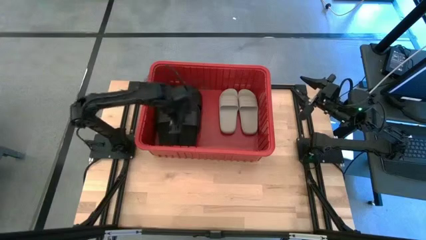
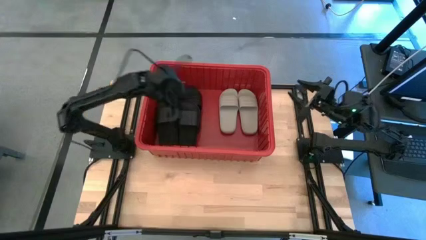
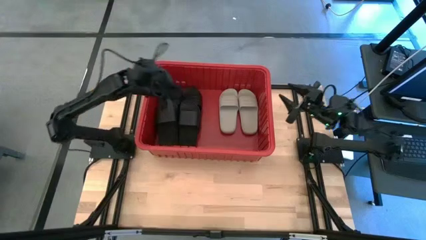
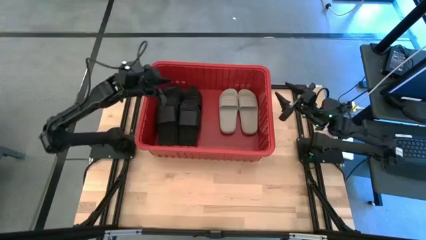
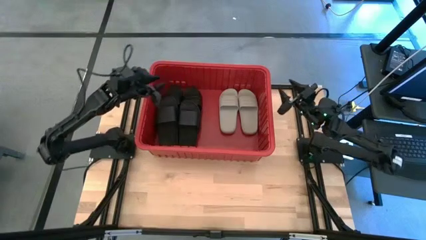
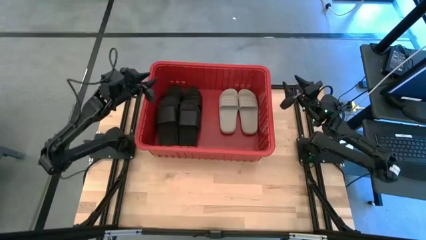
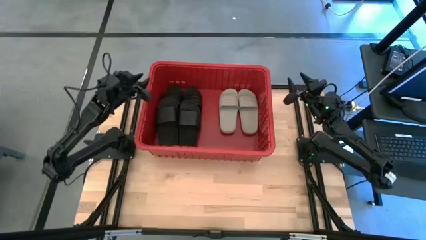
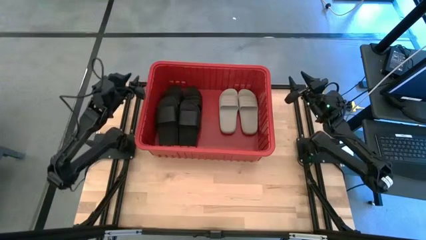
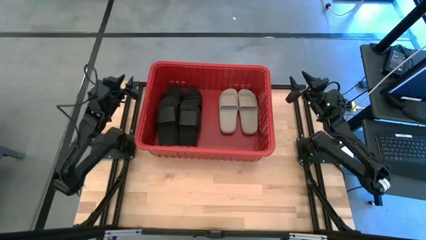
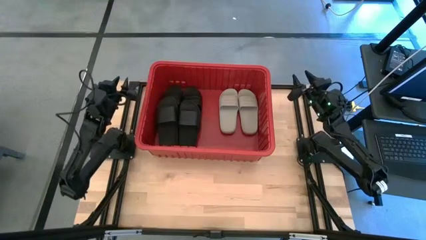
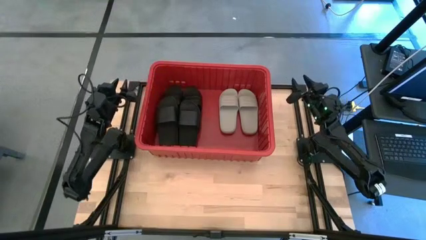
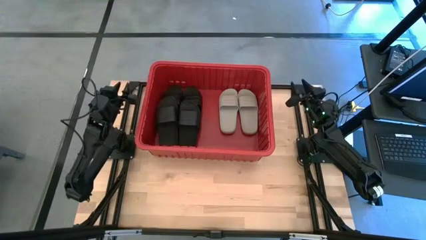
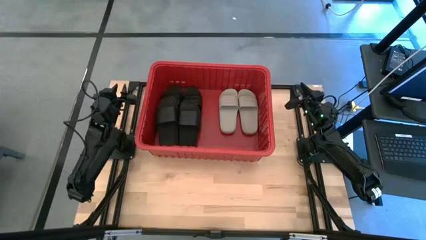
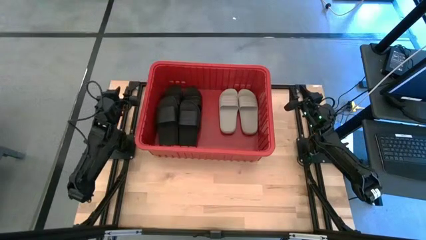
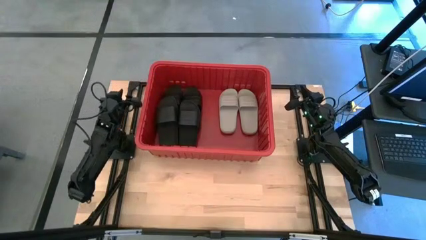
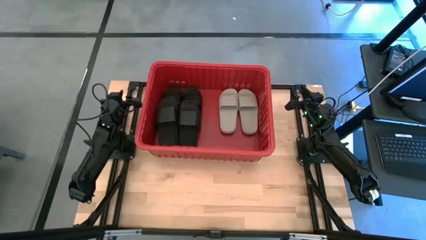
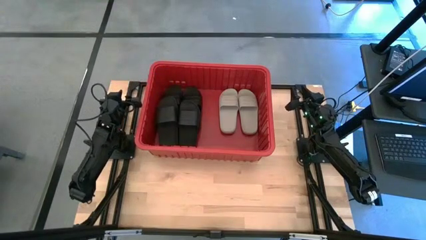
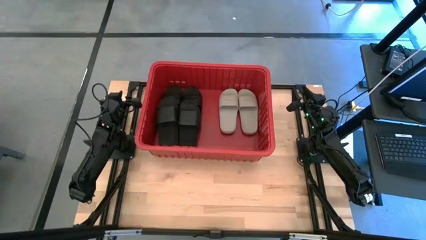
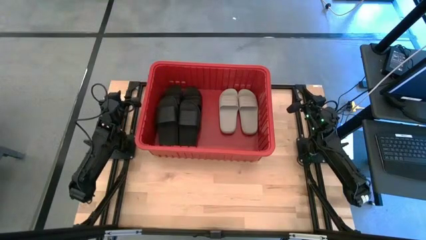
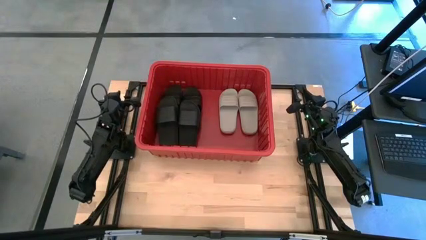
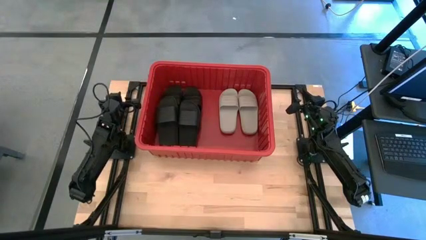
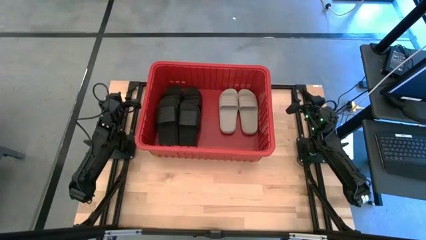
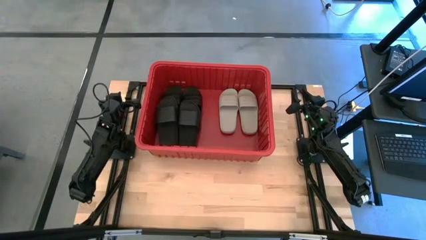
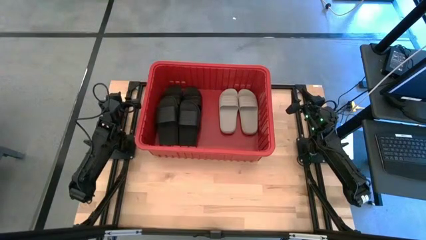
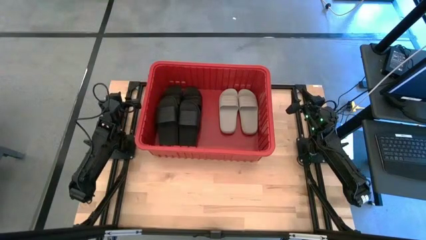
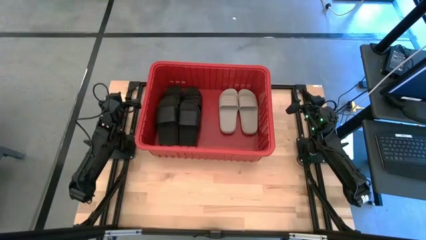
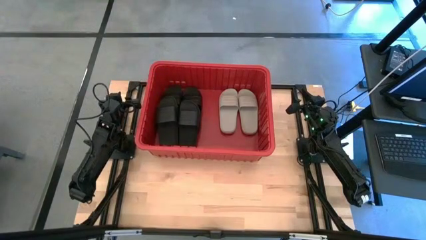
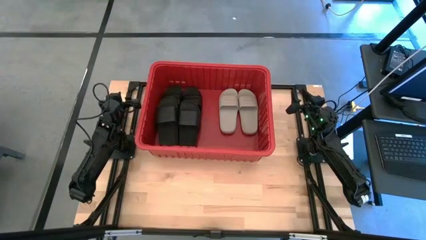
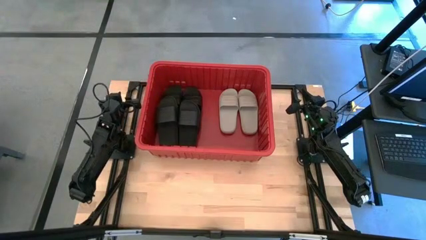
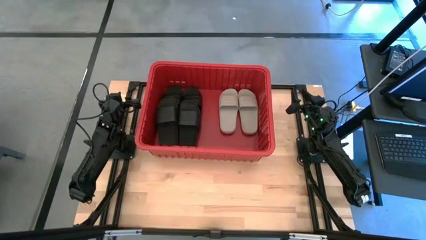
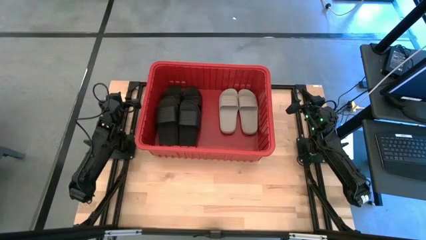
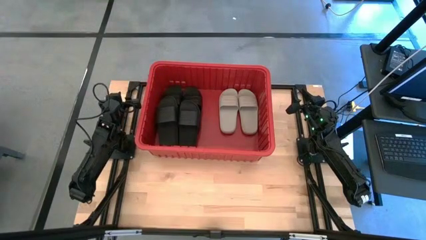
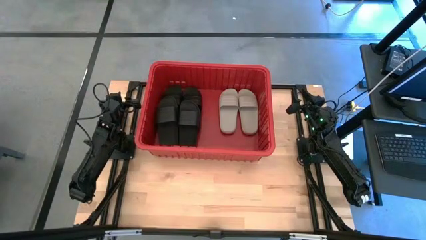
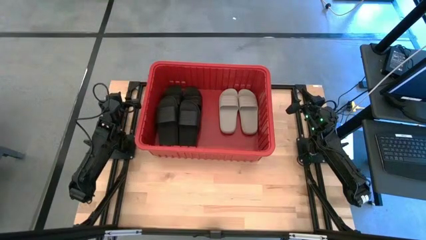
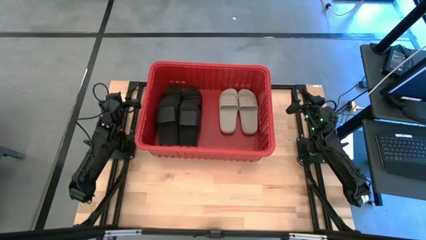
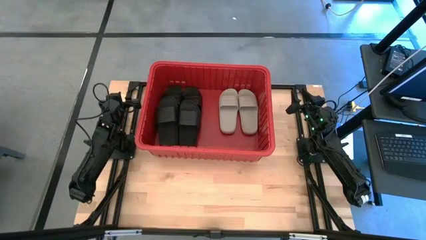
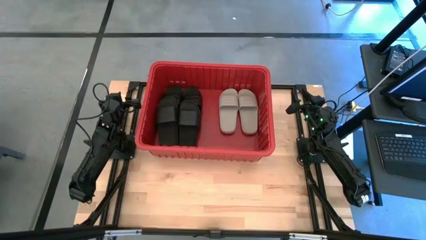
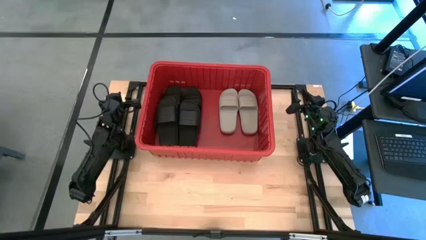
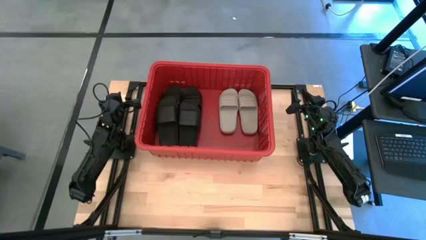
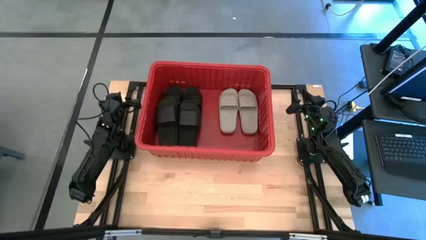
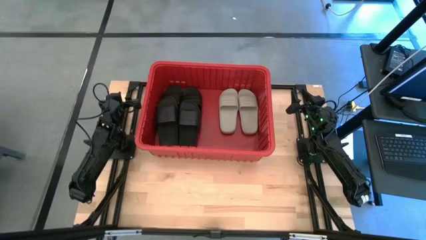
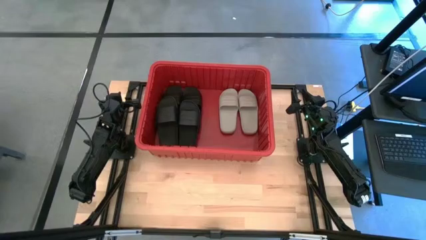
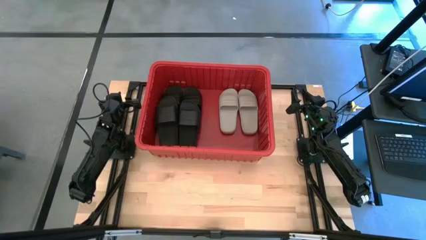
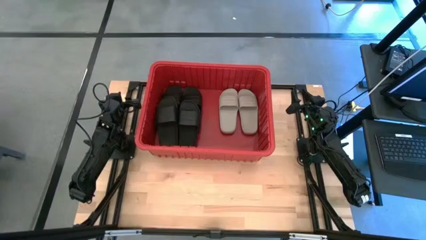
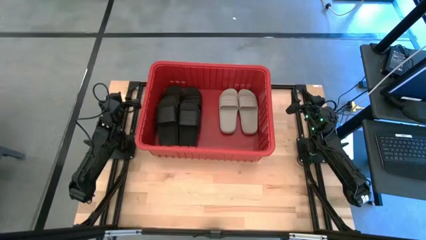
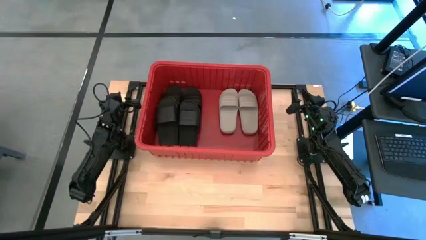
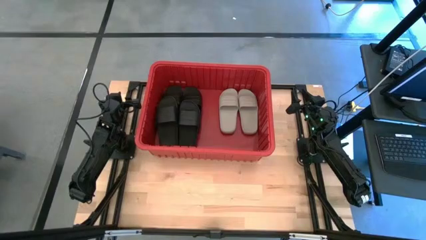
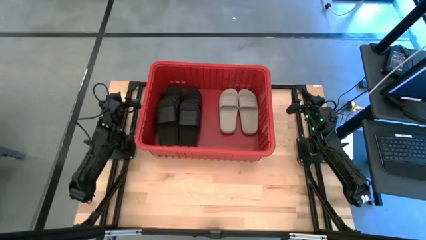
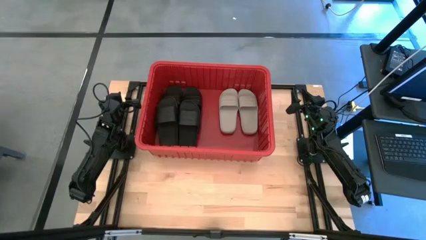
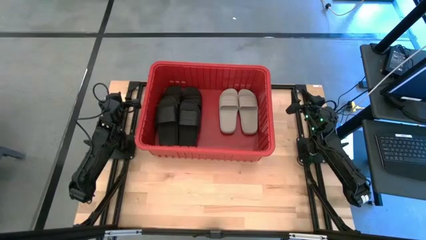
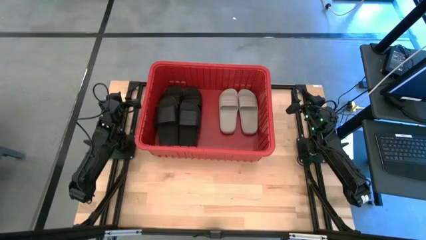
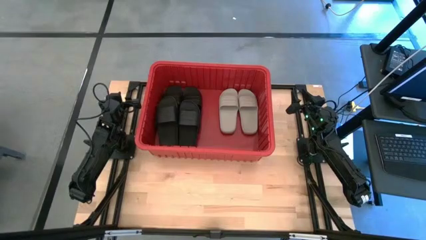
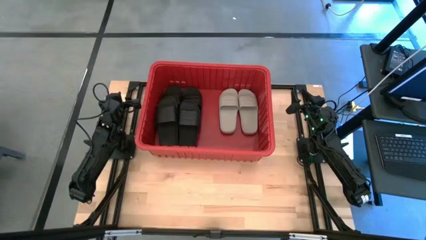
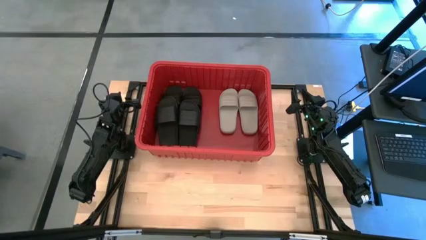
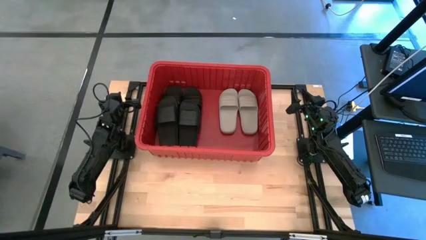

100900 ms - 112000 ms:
Task: Pick and place slides into bin
Return to Home Position

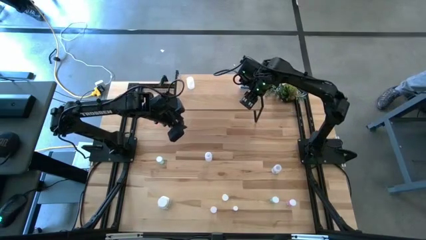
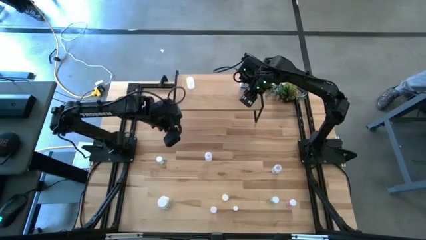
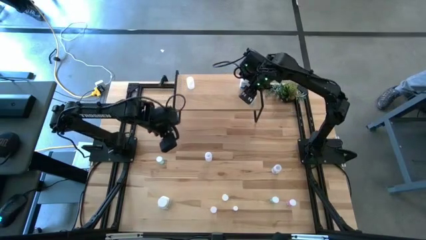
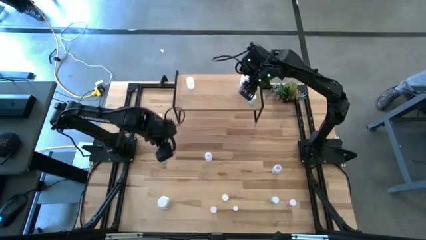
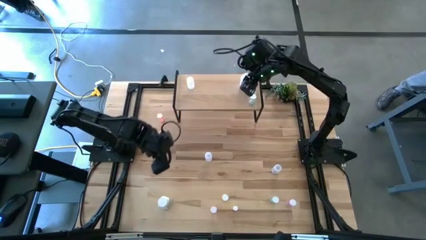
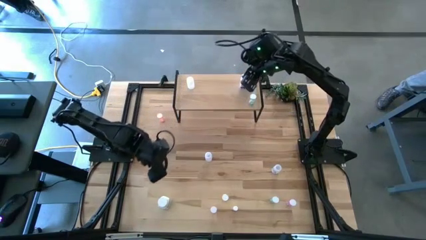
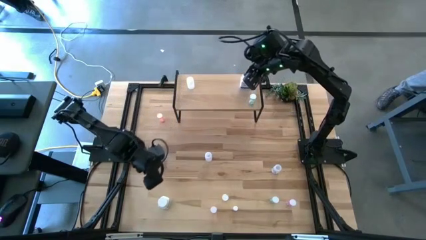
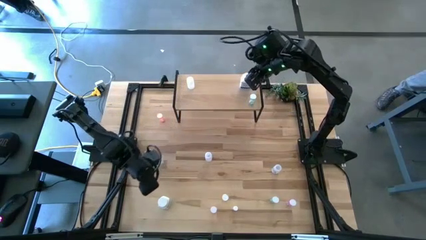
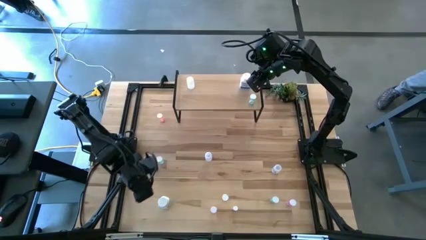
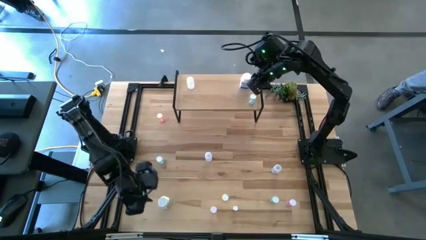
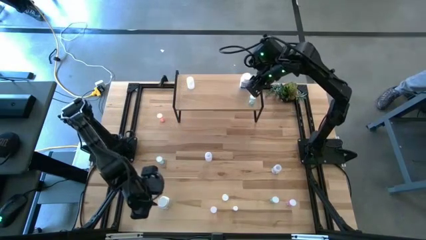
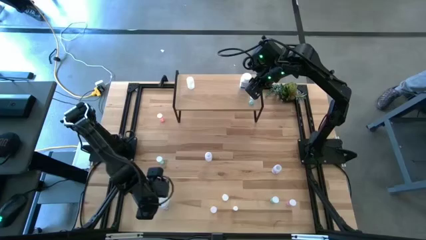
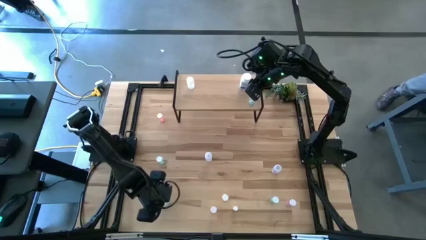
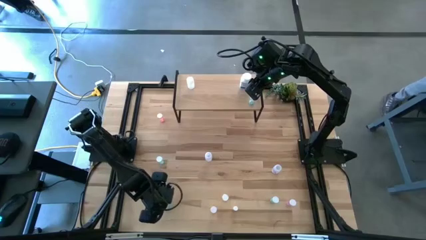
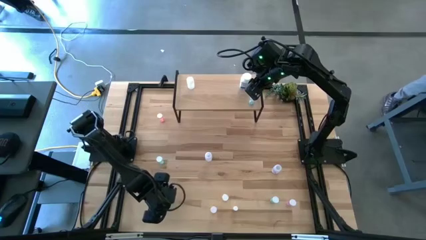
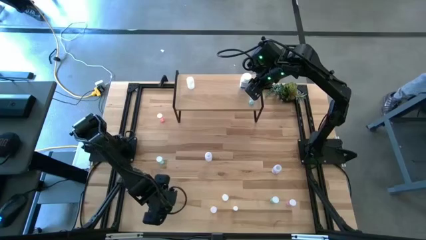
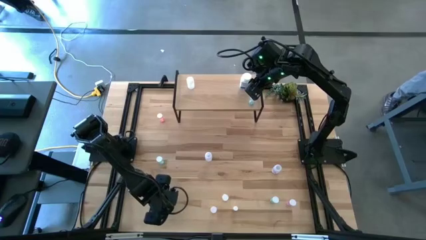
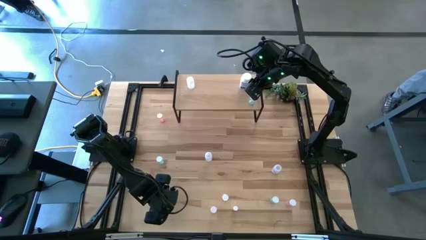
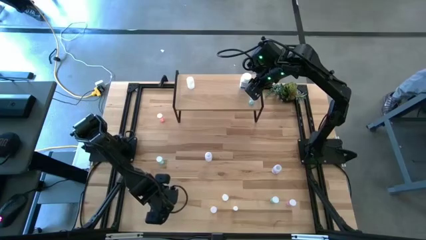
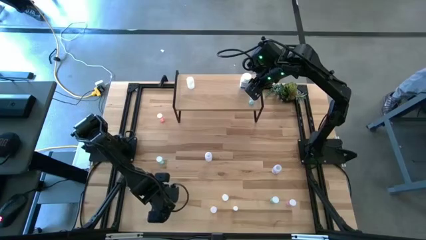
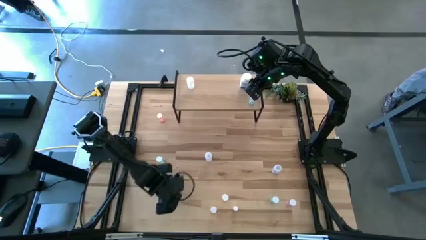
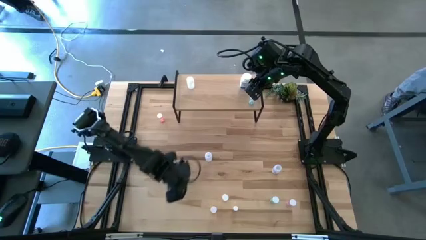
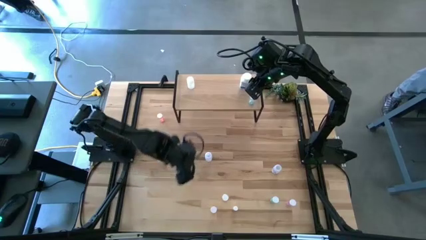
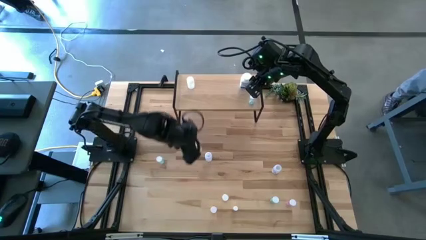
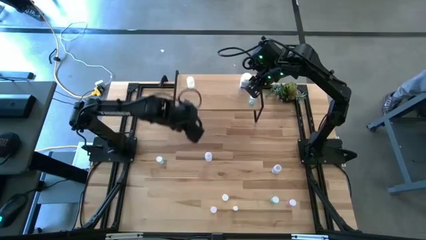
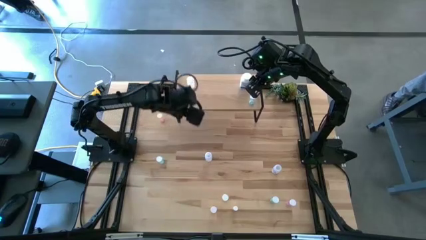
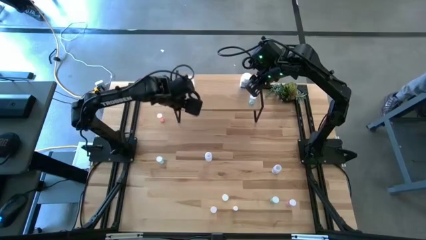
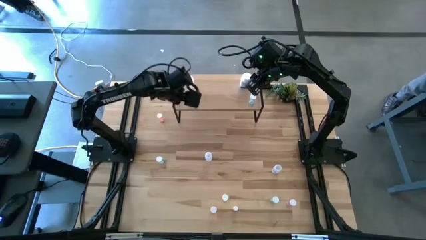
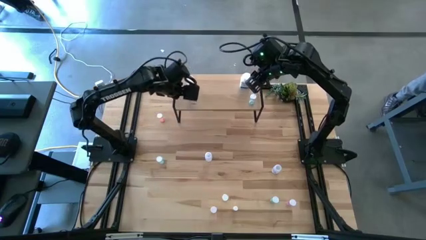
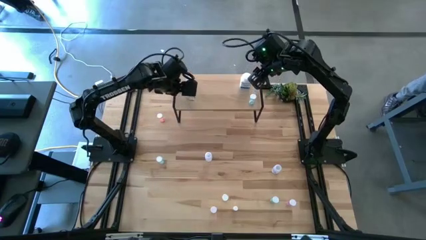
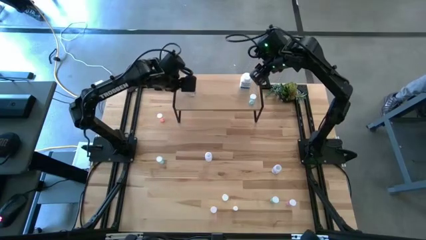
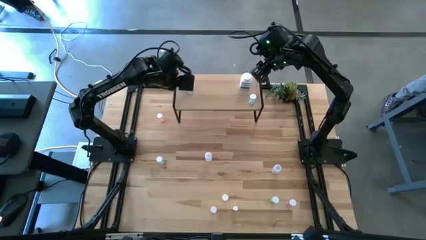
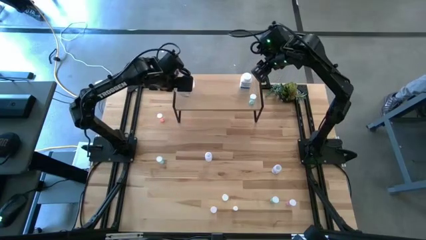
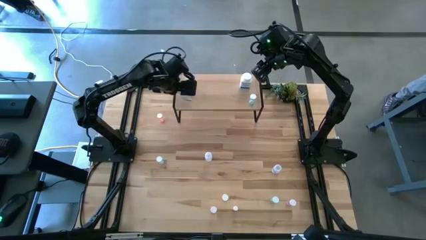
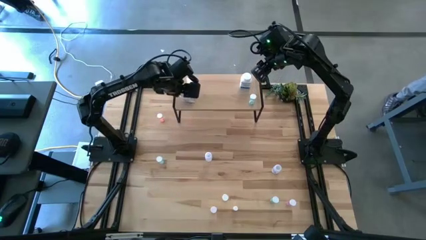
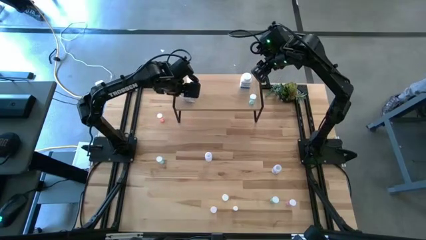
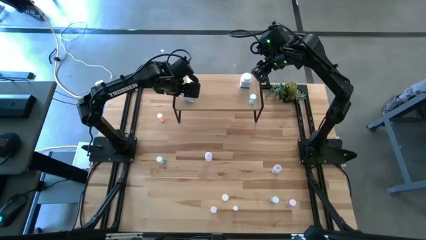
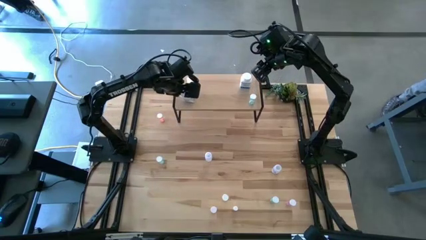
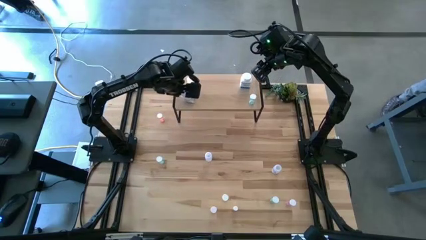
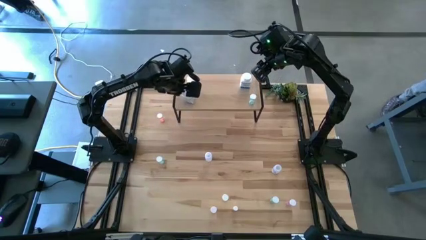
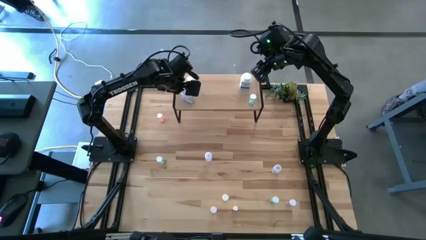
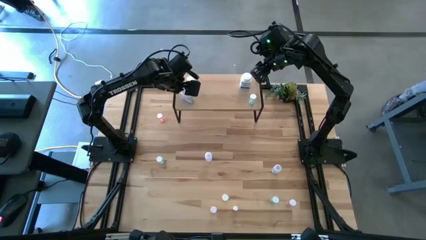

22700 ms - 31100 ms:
Task: Pick and place medicine bottles onto shelf by color
Put the white pill bottle on the shelf
